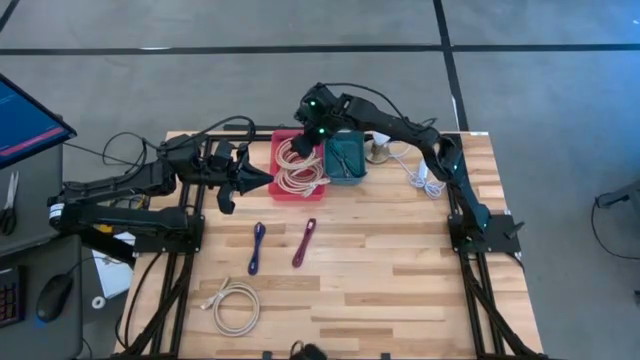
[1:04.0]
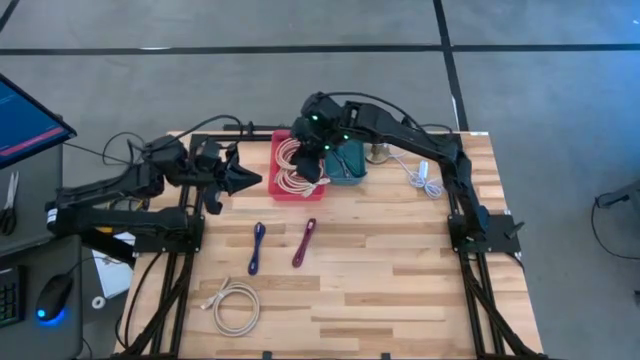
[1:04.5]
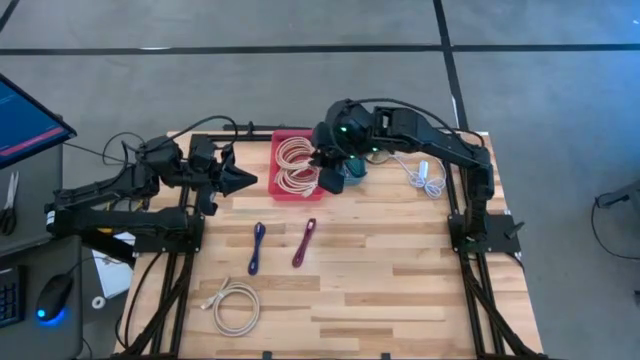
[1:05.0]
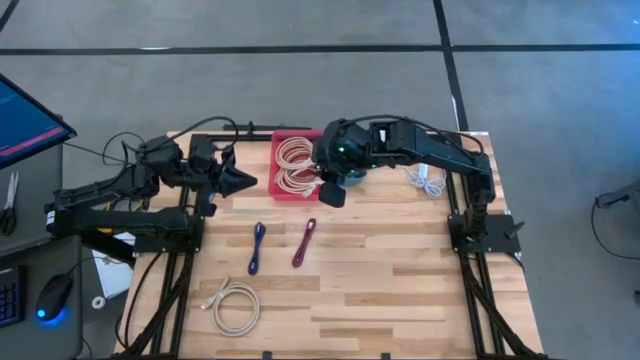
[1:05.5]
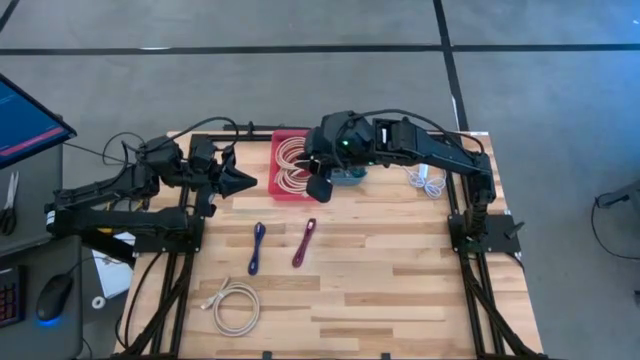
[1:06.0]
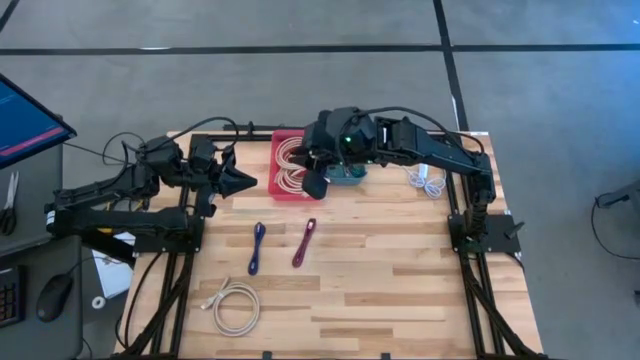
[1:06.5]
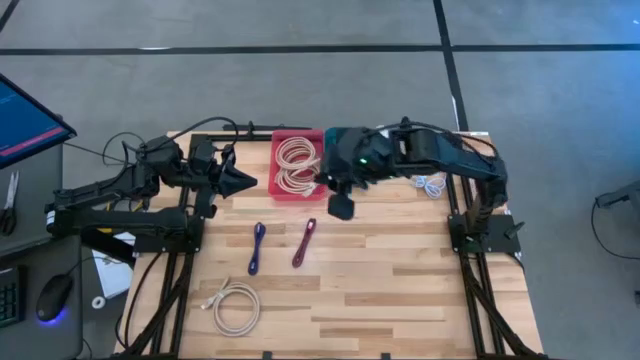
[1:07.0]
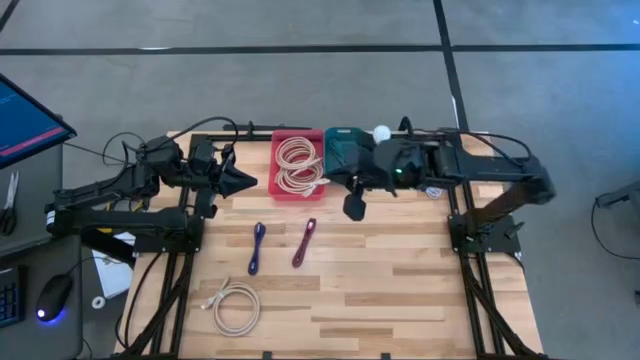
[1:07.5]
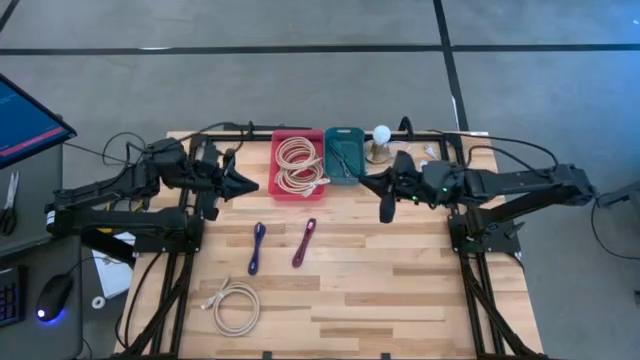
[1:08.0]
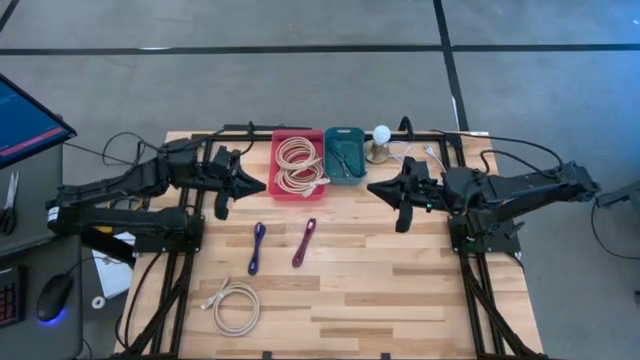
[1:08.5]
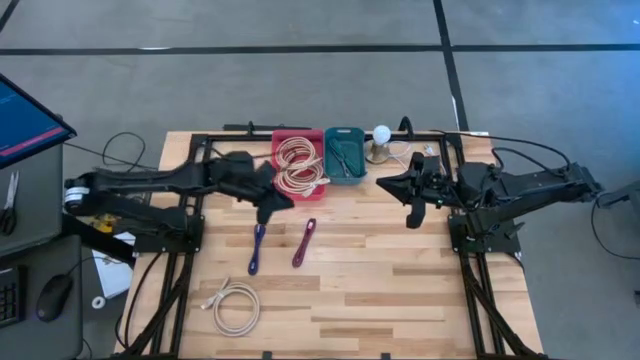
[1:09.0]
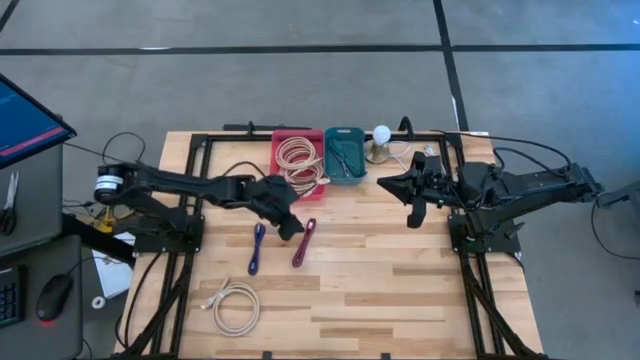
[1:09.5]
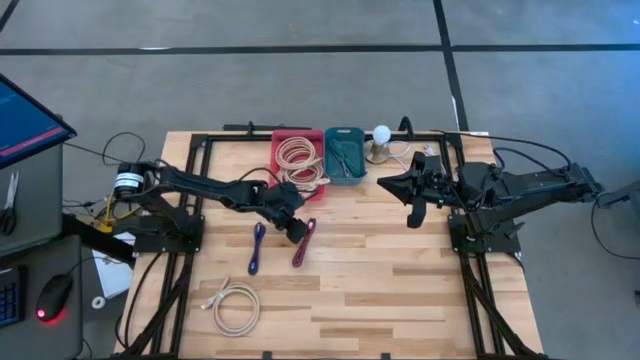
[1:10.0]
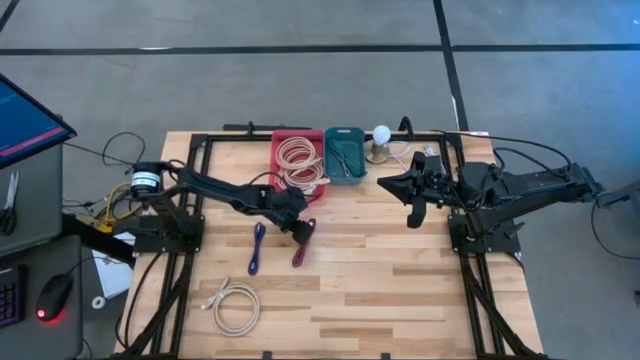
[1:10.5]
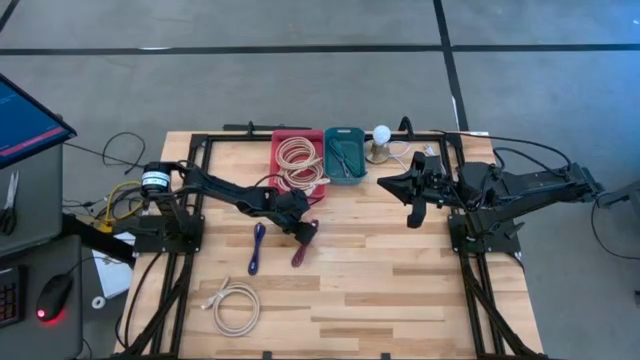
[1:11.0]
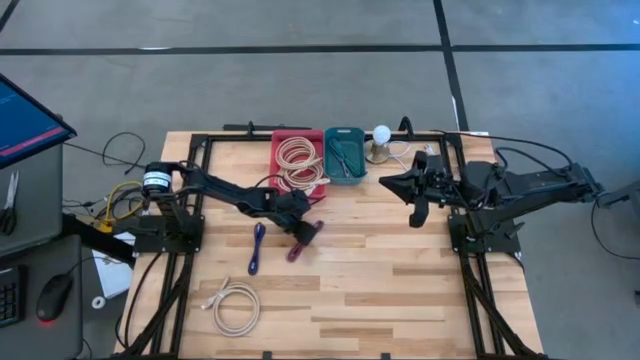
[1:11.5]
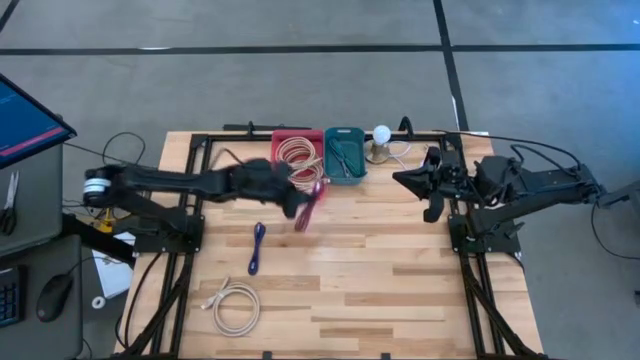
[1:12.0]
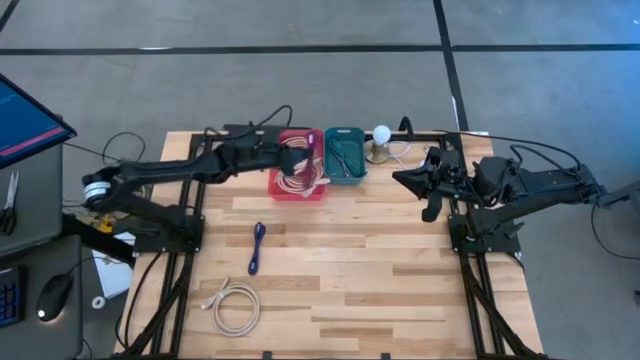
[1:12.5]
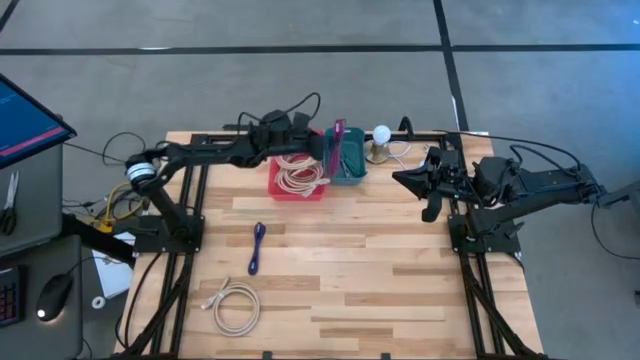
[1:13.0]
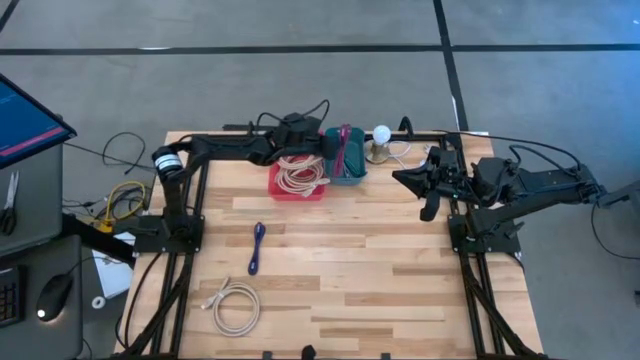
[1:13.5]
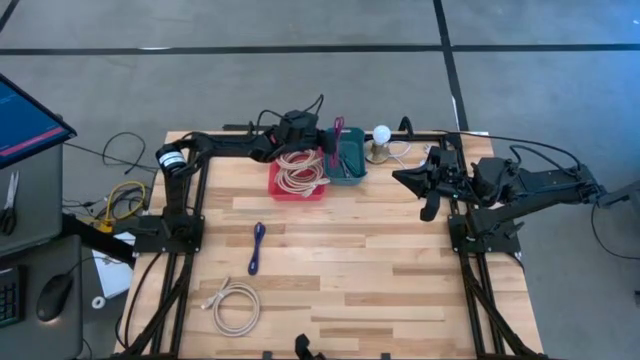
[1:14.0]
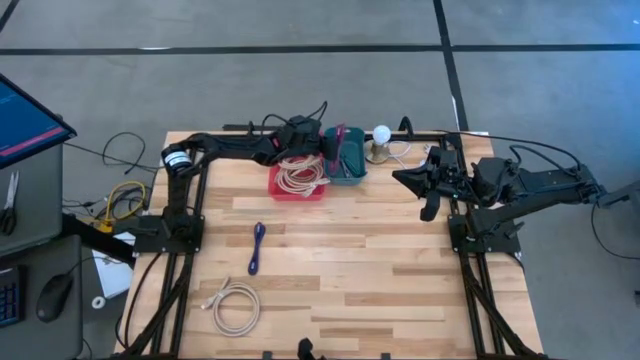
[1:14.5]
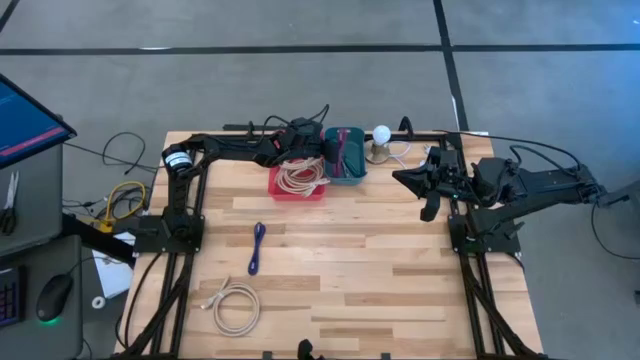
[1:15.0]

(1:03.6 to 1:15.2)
Task: Pick & Place USB Port
Put the pink charger cable into the blue bin

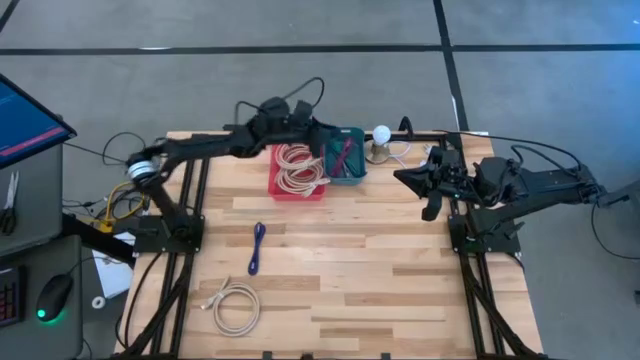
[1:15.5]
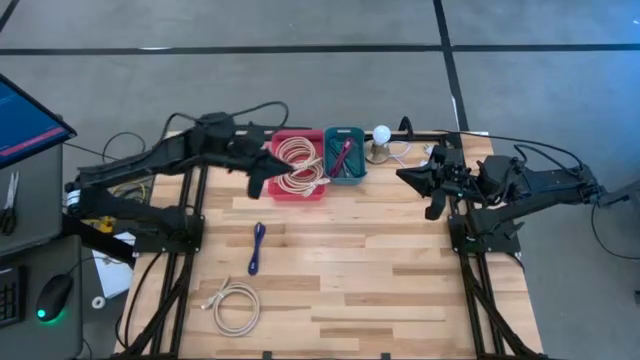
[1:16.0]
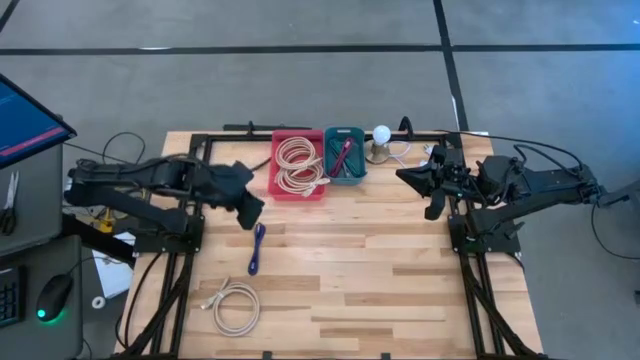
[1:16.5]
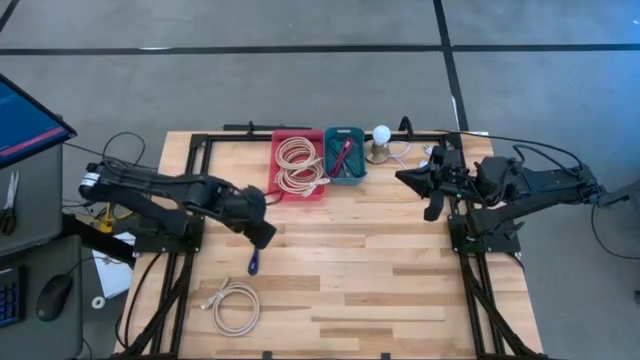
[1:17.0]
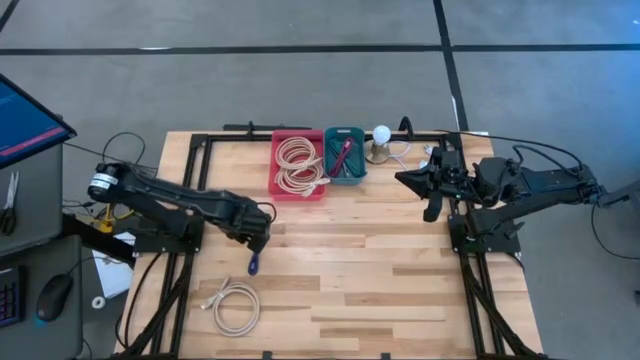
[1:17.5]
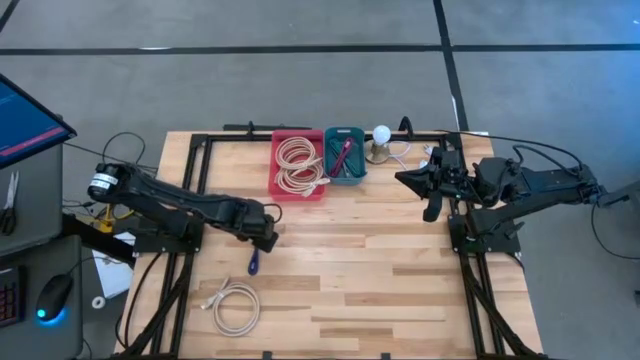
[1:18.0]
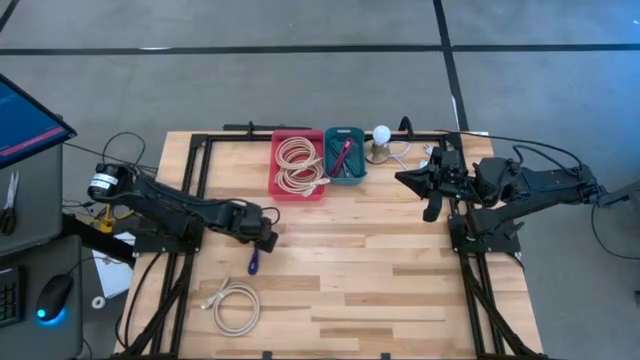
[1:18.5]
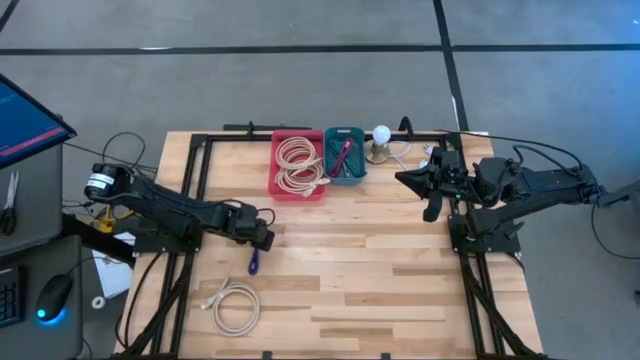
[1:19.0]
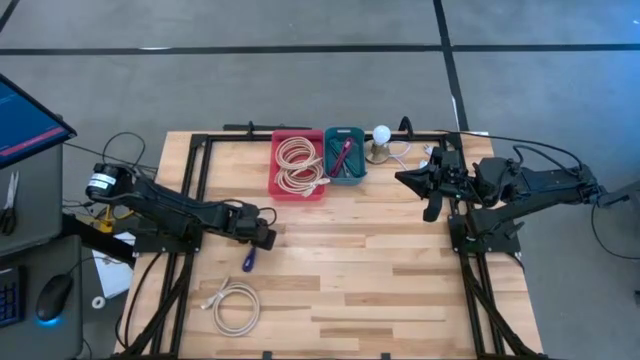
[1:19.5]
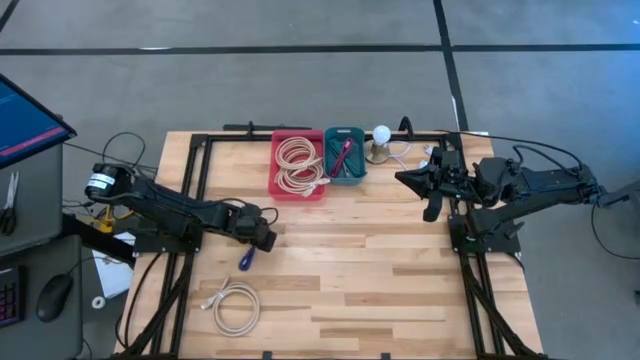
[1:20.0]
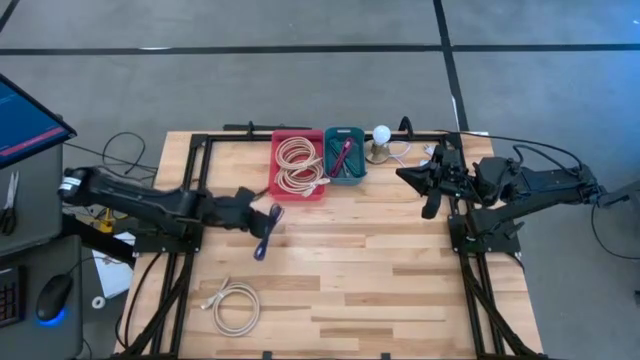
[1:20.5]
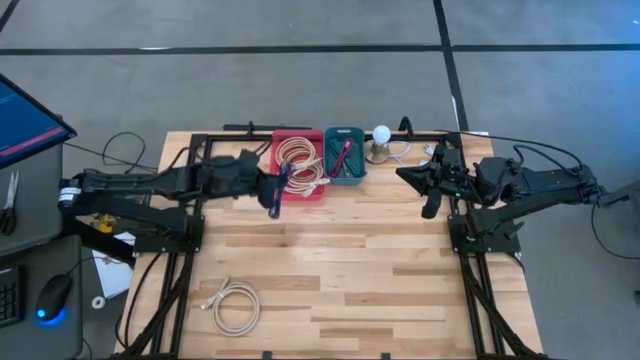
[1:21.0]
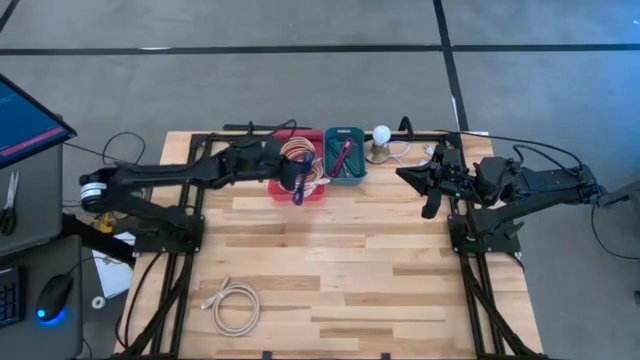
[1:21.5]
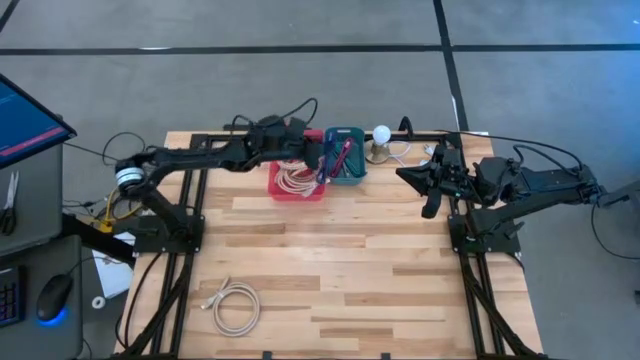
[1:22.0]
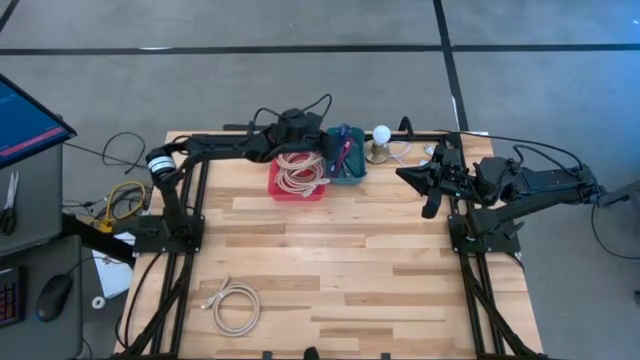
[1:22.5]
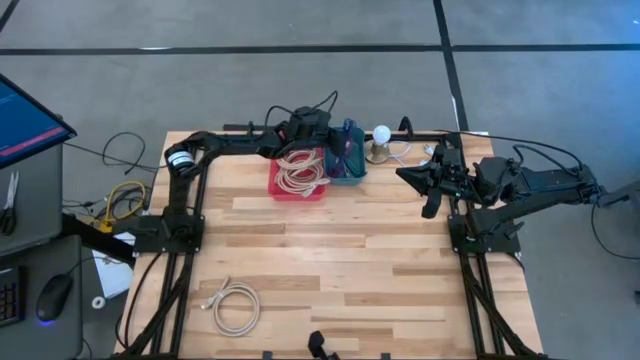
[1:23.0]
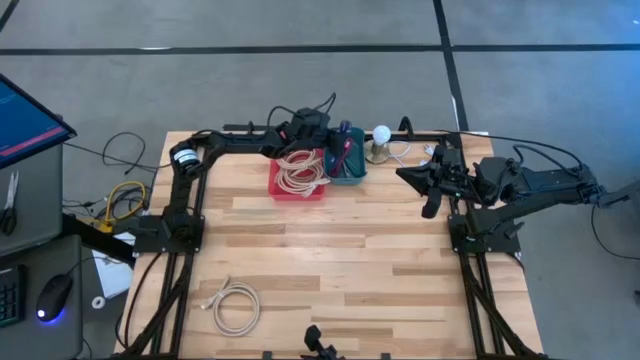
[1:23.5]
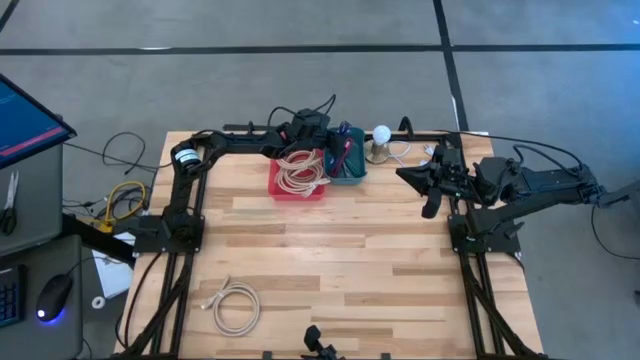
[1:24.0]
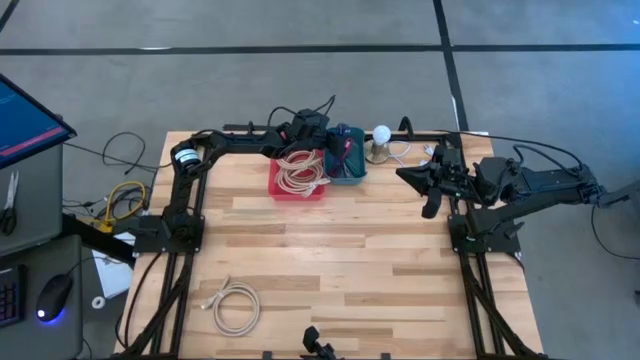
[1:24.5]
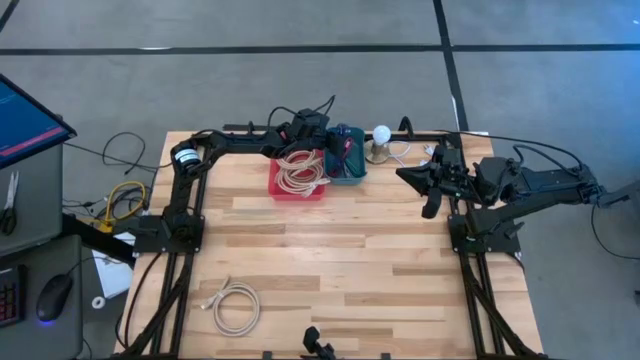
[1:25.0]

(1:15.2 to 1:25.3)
Put the purple charger cable into the blue bin
